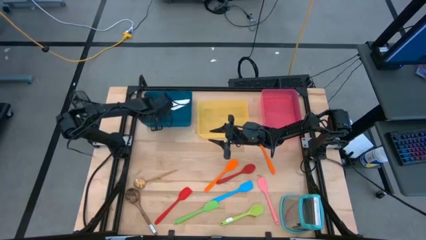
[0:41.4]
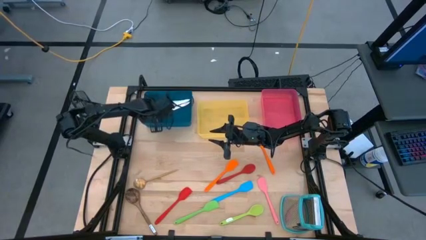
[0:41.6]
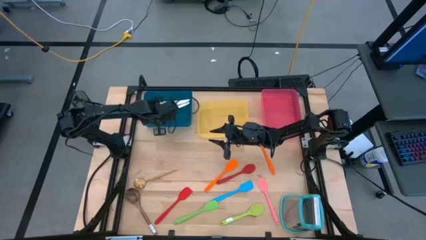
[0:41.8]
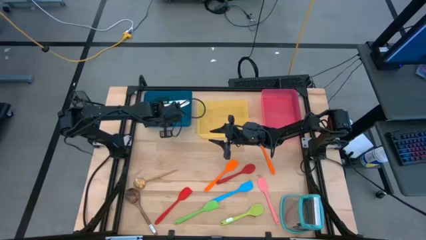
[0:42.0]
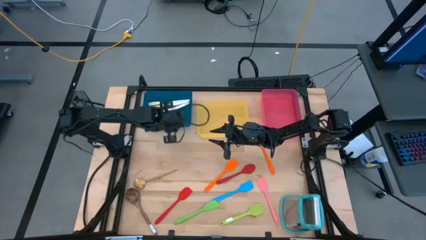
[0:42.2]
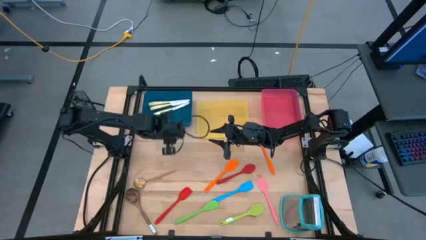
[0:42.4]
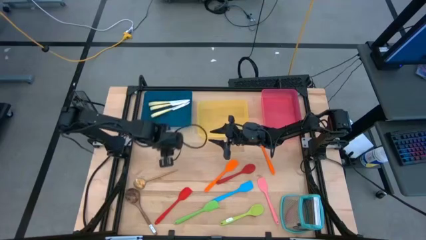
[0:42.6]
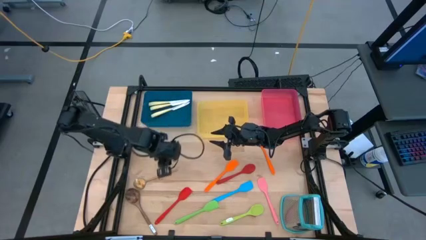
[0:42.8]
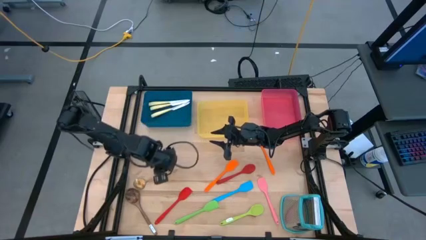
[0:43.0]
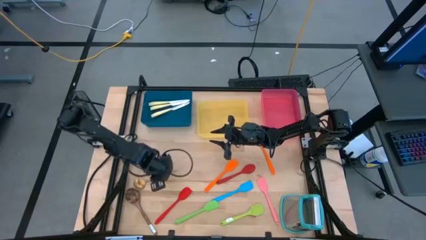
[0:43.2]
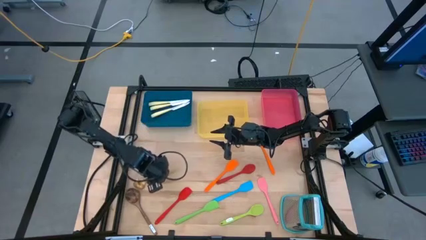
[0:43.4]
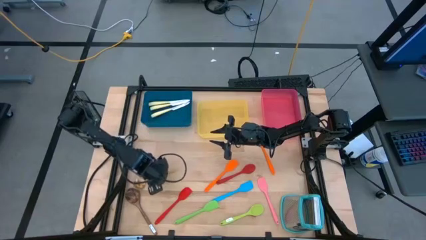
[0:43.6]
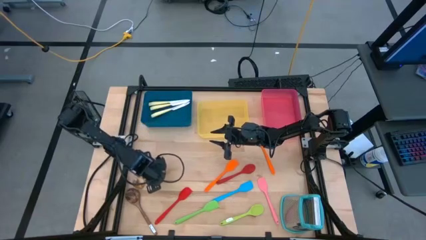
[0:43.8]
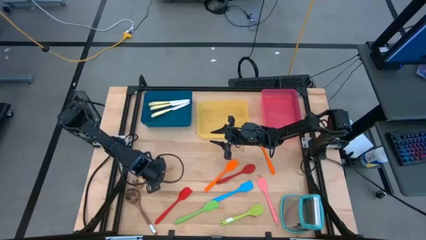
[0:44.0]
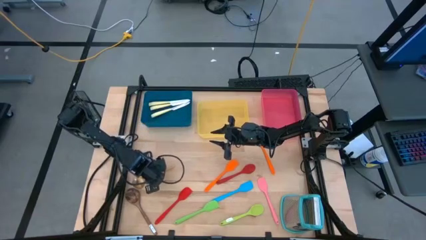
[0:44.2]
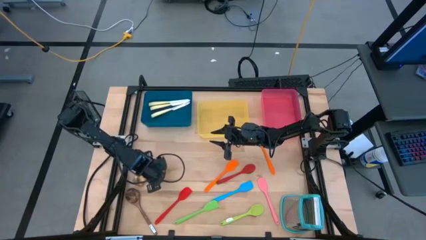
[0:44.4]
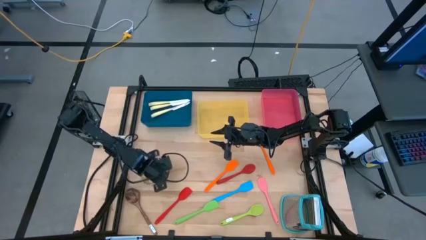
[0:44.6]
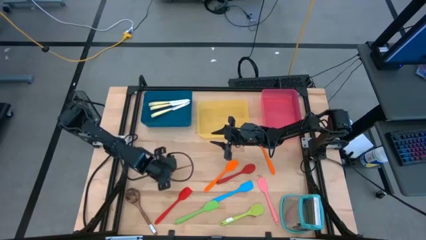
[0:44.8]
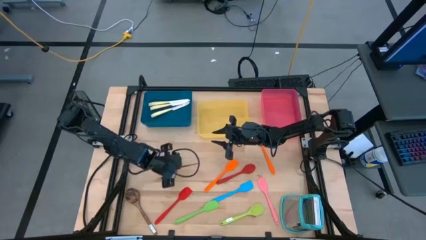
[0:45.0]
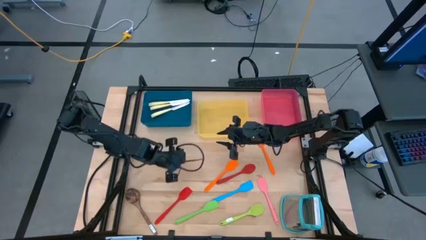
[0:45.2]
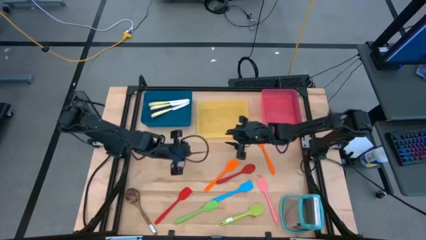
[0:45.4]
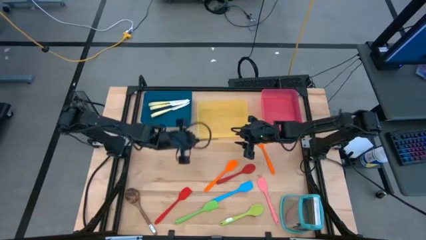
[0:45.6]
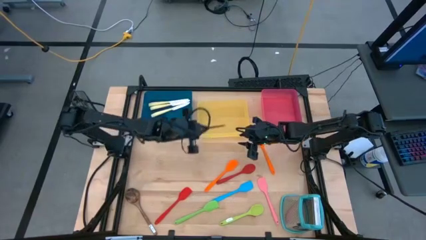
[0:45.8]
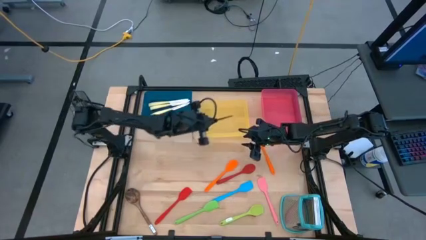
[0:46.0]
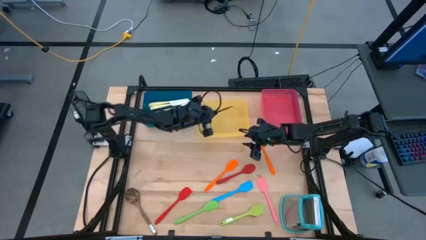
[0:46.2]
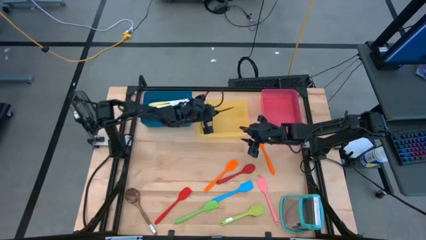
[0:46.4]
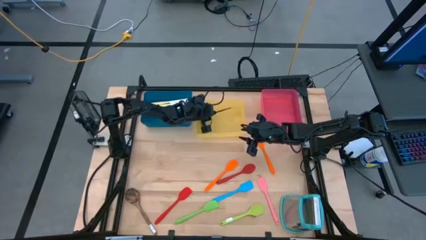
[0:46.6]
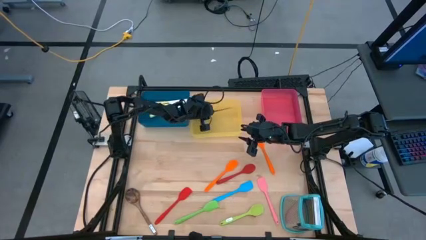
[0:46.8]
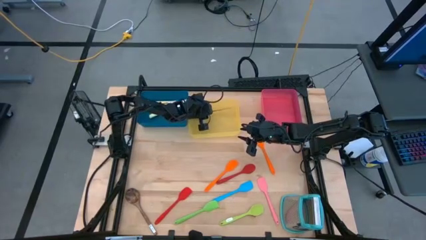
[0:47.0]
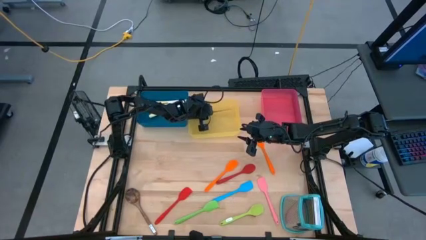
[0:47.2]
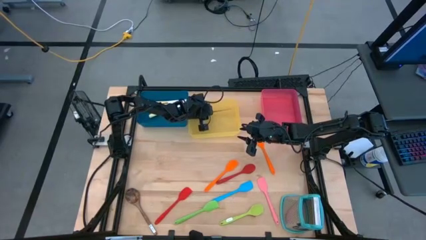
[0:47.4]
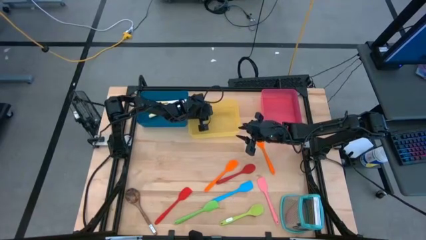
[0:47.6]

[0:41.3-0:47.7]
Task: Pick & Place Kitchen Items
Put the gold spoon into the yellow bin

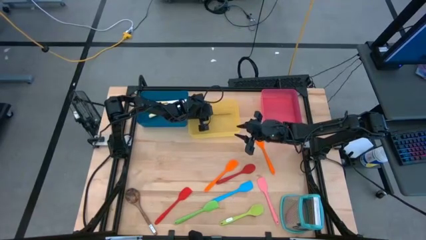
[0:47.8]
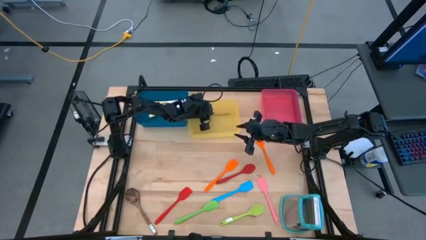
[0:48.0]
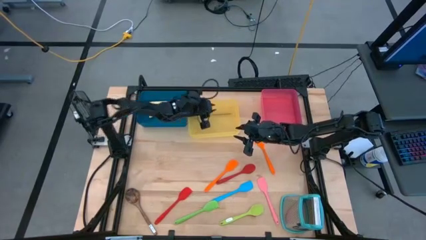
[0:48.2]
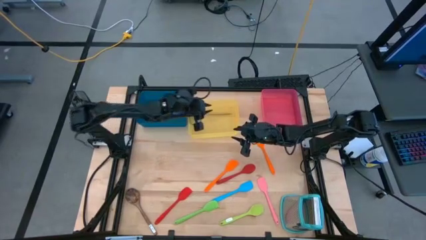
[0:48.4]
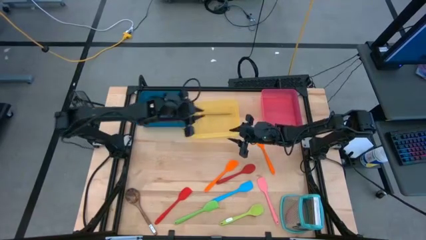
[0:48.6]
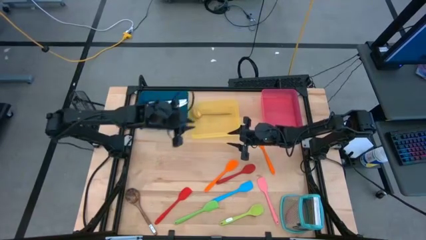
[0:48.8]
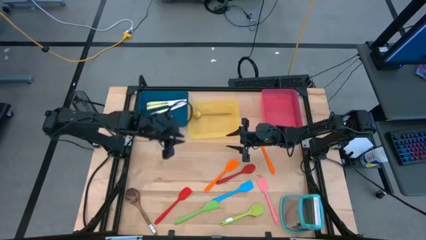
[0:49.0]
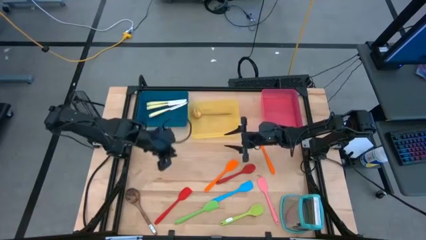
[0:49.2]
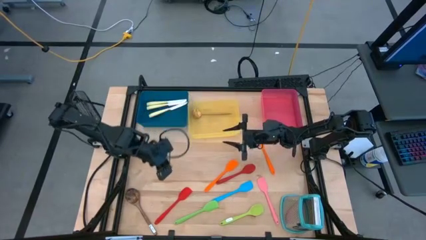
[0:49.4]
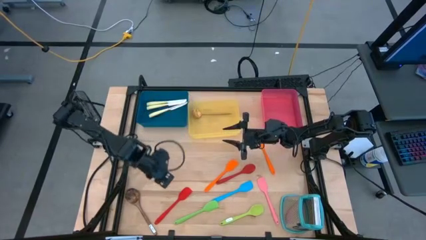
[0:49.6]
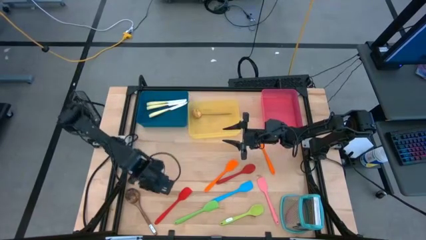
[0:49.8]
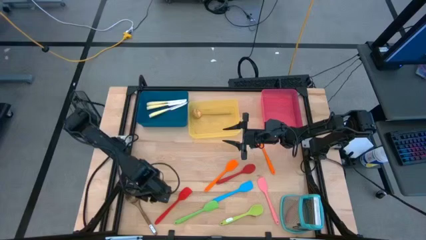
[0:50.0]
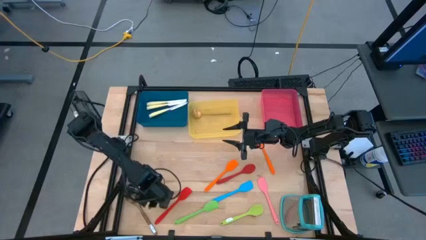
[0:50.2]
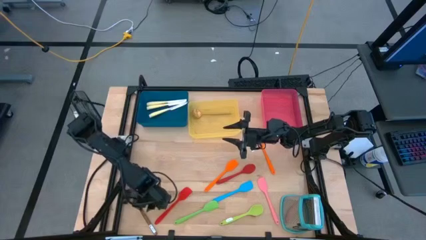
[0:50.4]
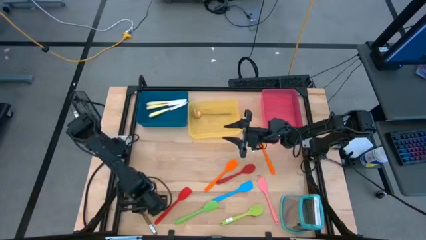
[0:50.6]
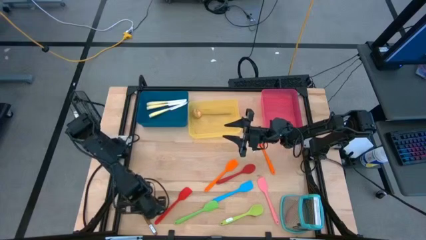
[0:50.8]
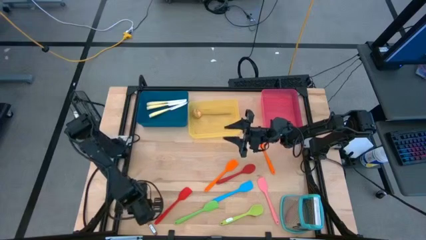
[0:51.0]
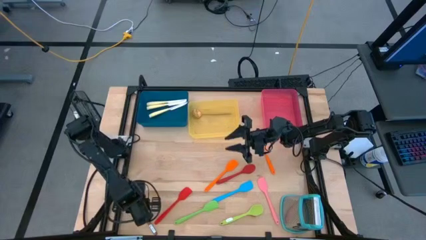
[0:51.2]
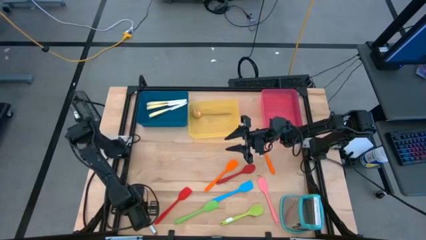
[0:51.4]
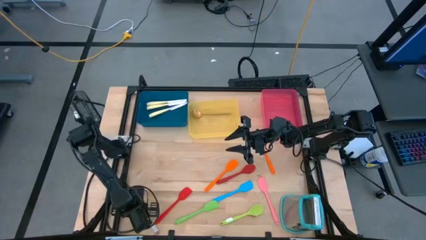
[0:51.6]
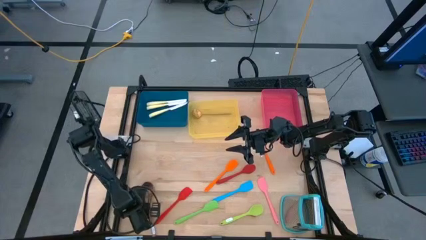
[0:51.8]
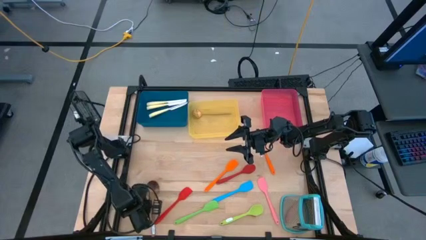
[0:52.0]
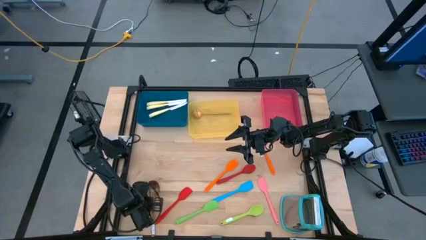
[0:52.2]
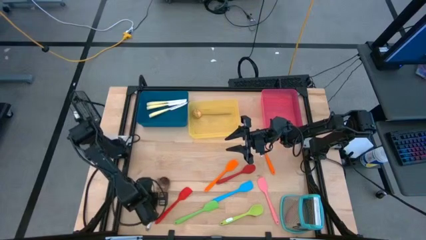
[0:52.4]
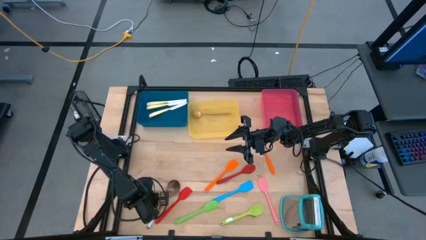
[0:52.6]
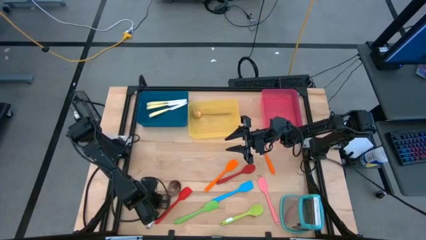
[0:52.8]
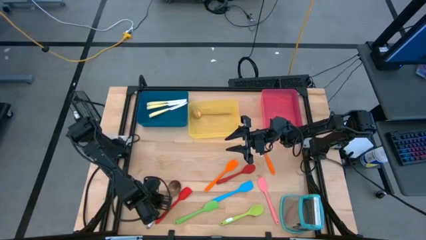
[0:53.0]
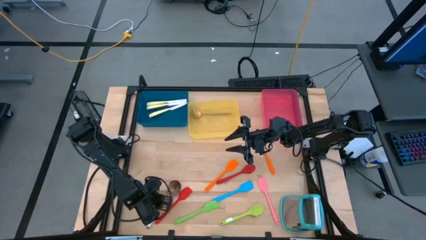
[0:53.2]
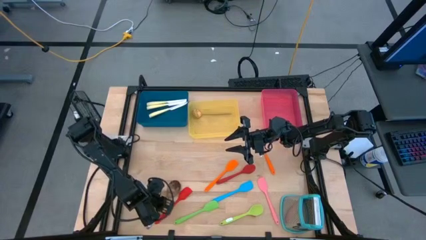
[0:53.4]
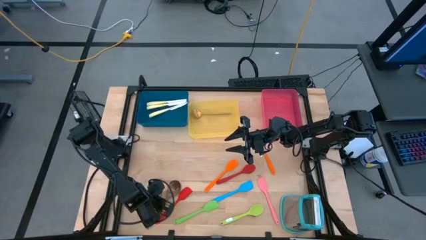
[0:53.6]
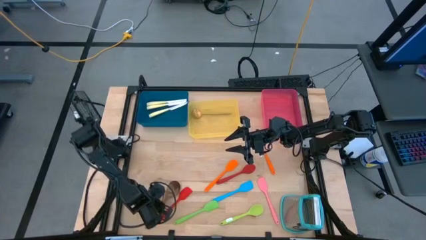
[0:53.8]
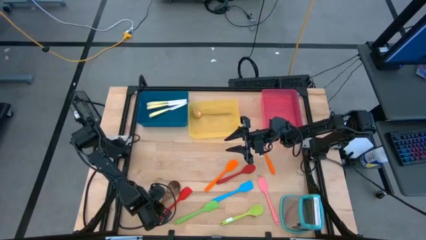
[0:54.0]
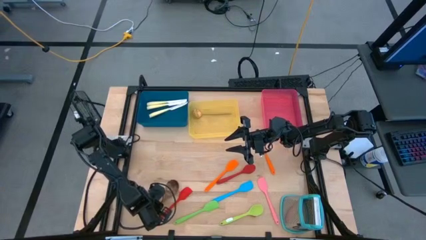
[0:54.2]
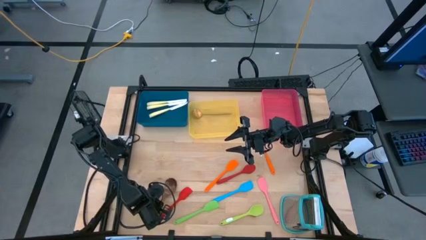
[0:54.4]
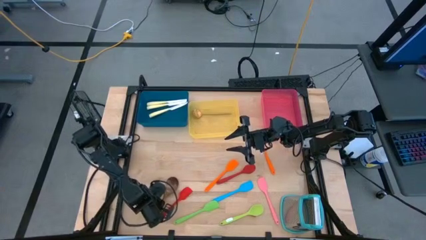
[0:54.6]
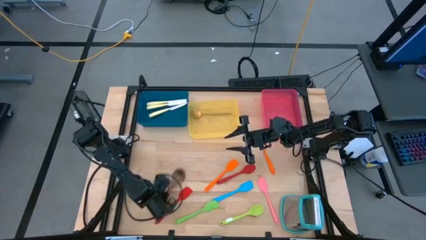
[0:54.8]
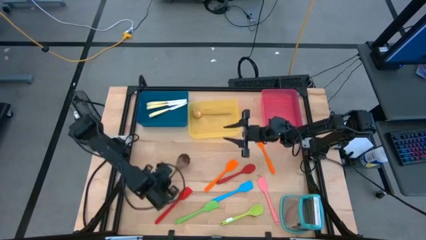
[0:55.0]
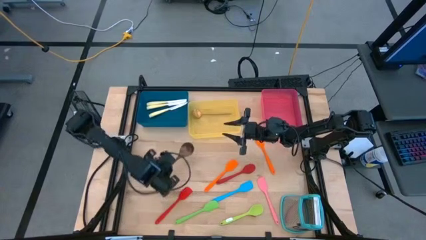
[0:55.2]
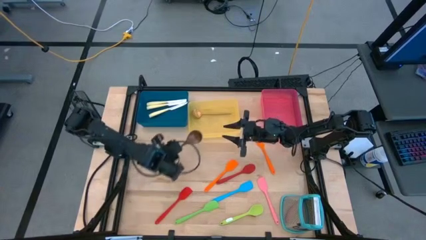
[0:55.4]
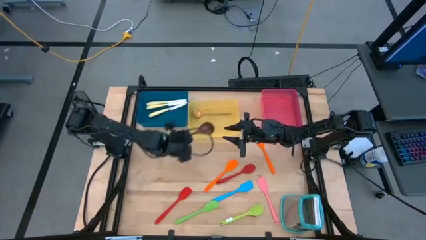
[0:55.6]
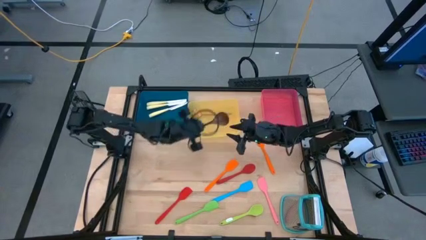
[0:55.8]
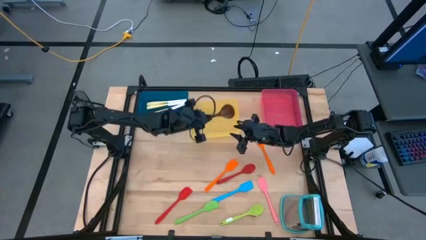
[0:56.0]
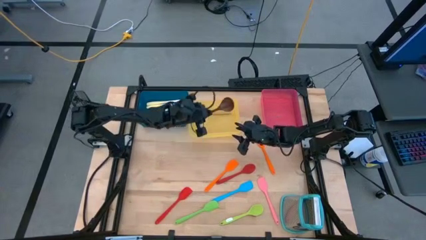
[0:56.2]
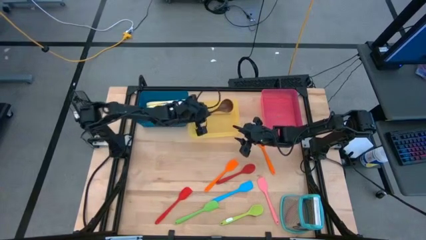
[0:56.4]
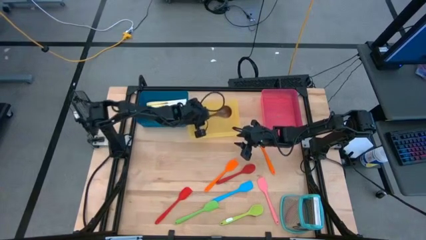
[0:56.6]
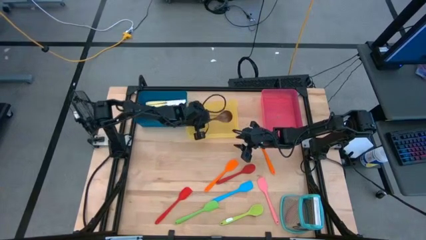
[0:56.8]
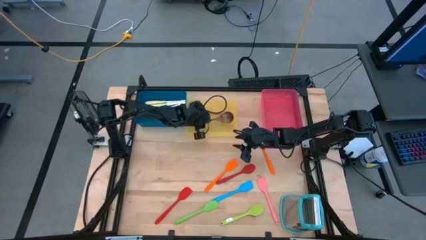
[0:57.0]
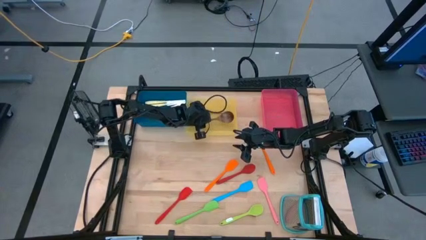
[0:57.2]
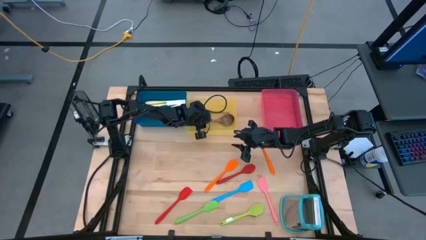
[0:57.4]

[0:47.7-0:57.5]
Put the brown spoon into the yellow bin
